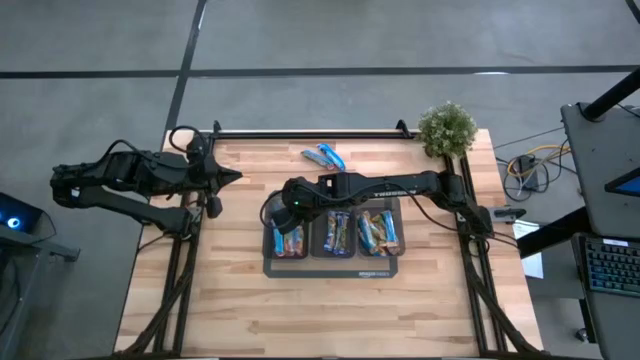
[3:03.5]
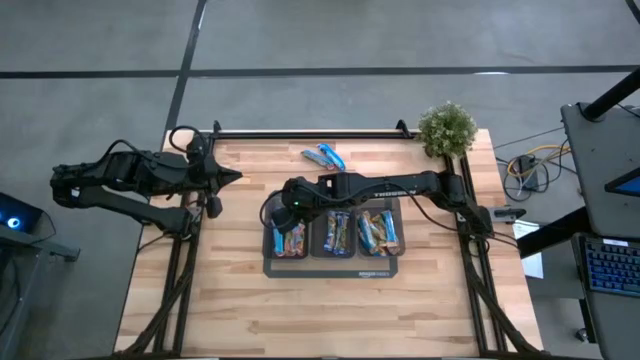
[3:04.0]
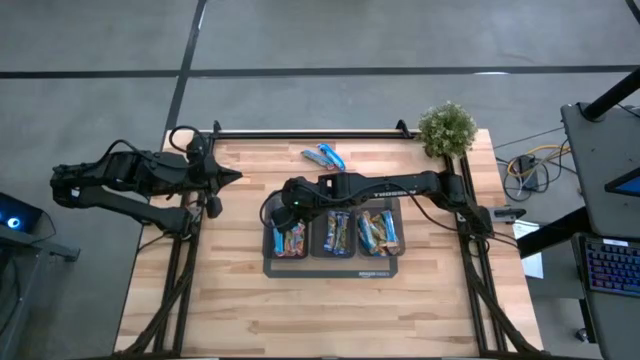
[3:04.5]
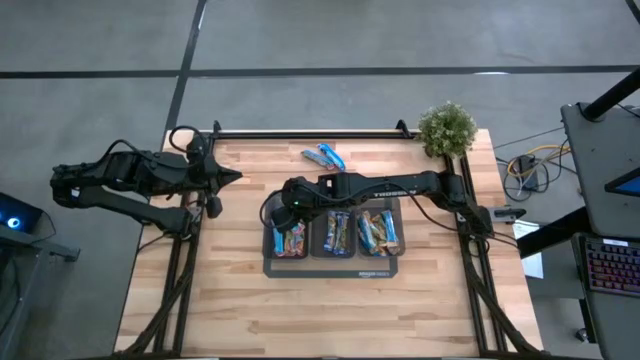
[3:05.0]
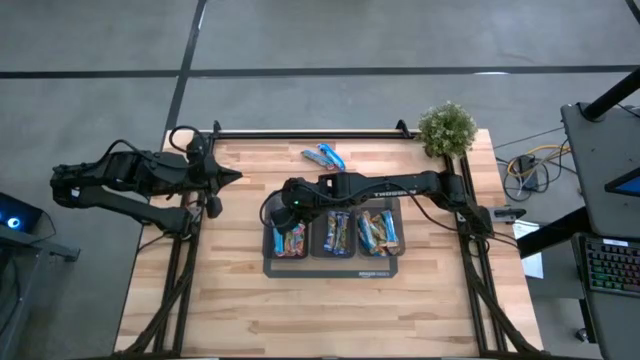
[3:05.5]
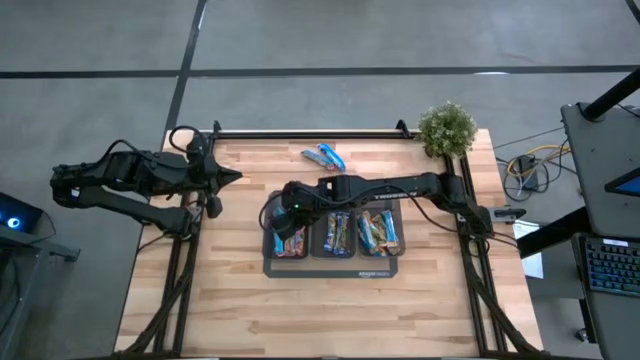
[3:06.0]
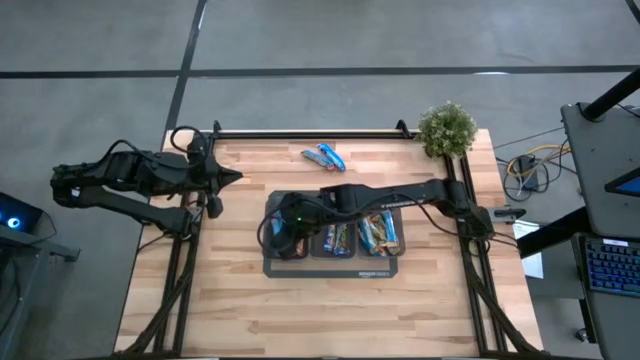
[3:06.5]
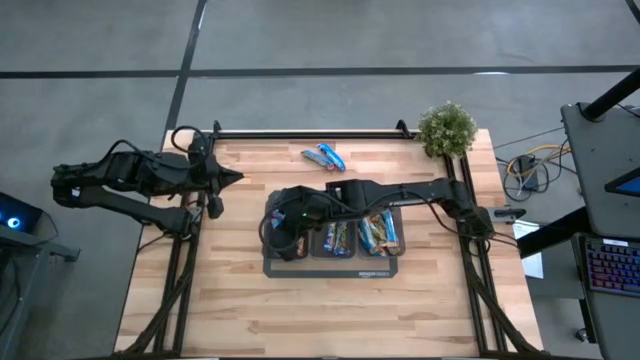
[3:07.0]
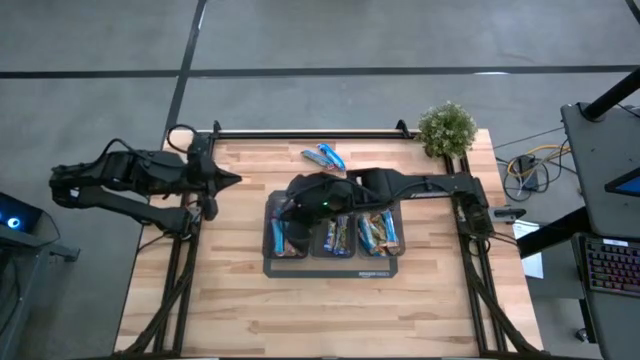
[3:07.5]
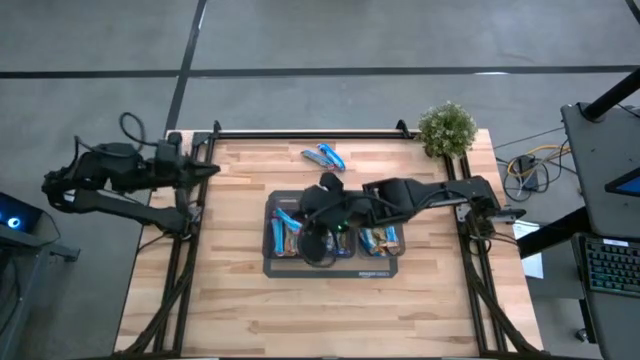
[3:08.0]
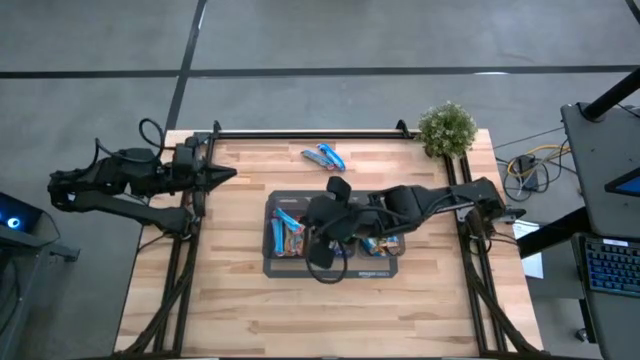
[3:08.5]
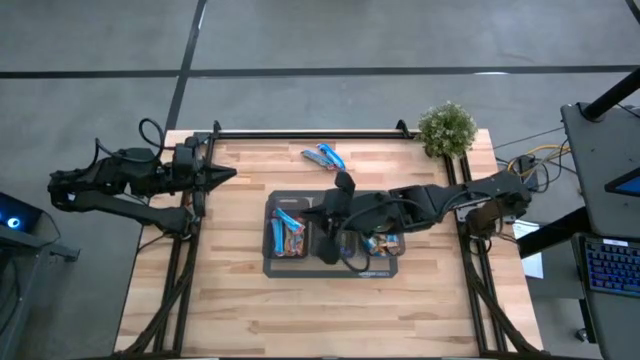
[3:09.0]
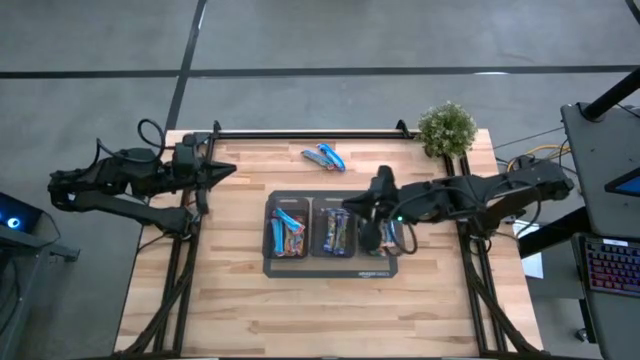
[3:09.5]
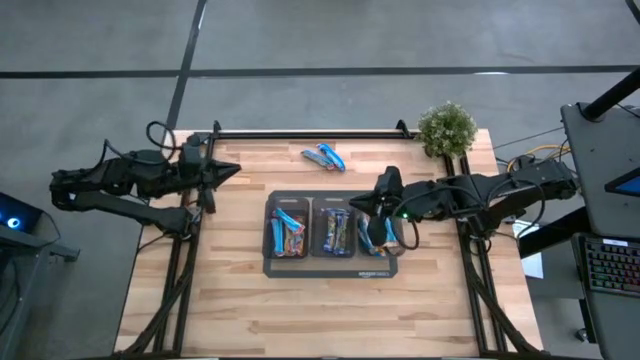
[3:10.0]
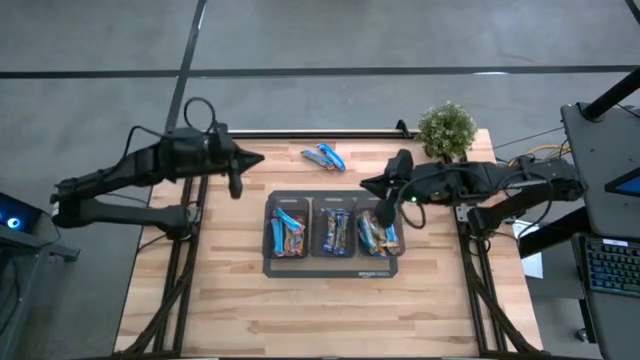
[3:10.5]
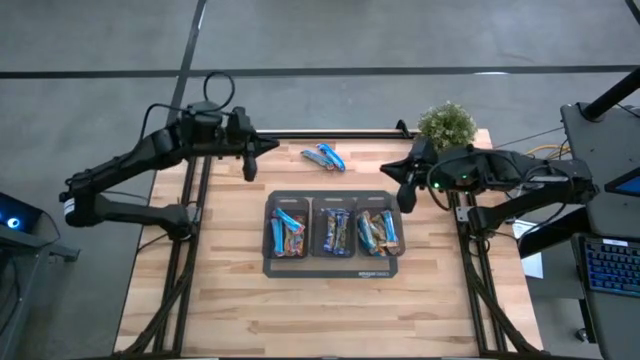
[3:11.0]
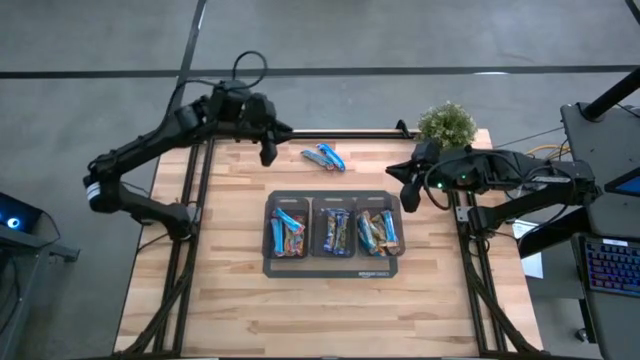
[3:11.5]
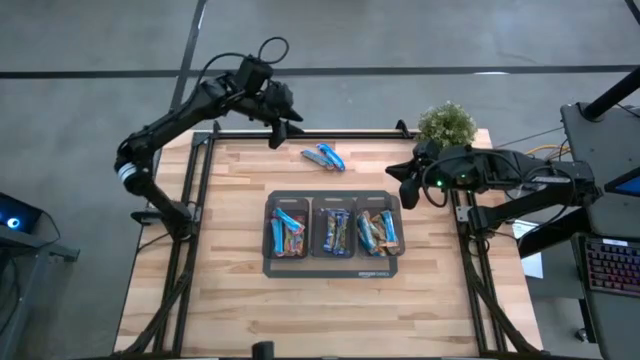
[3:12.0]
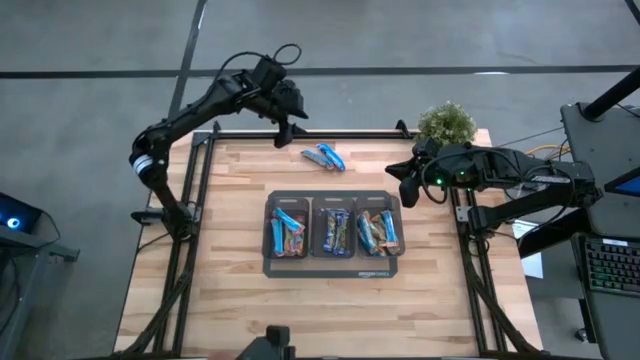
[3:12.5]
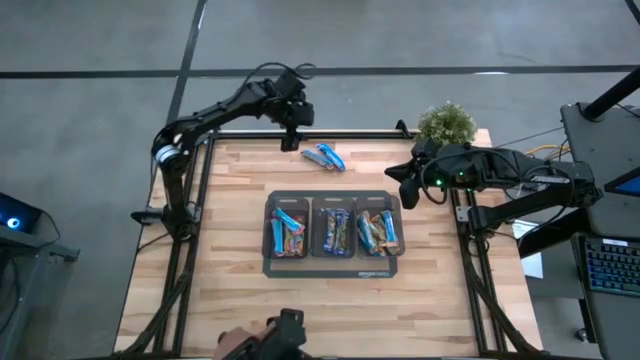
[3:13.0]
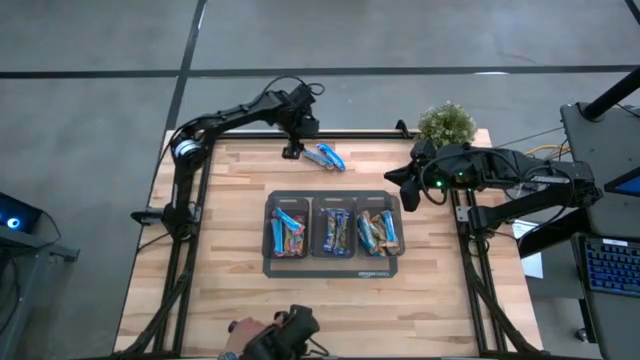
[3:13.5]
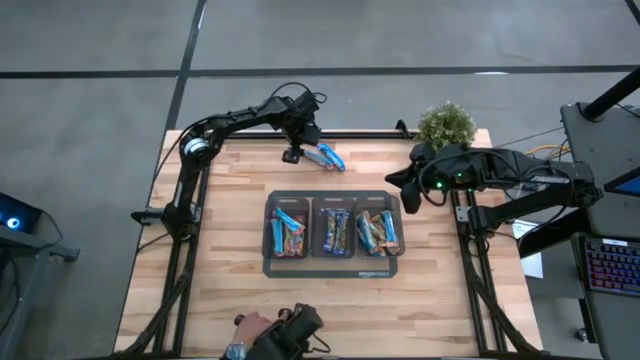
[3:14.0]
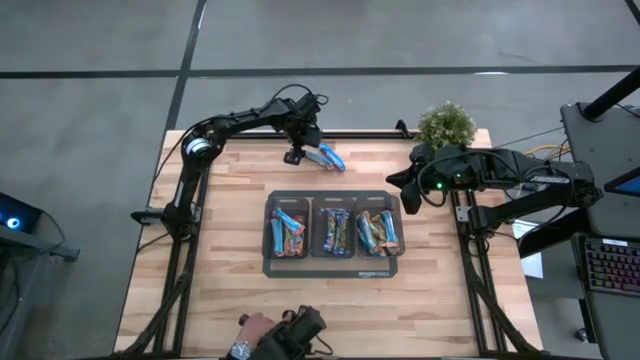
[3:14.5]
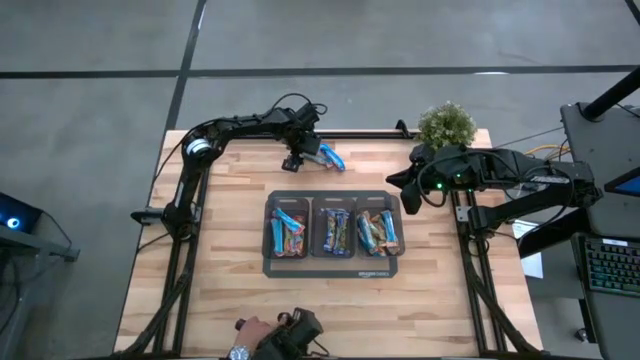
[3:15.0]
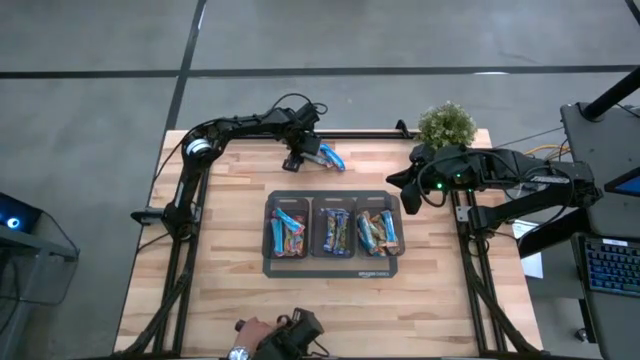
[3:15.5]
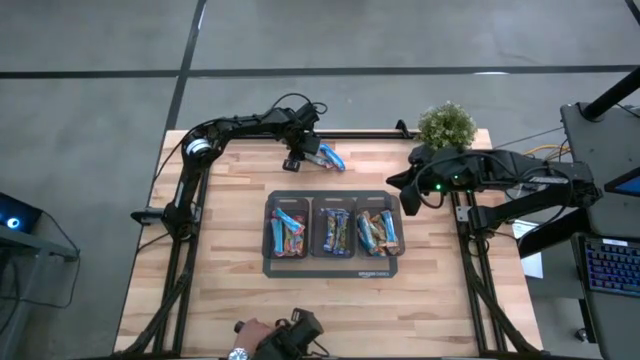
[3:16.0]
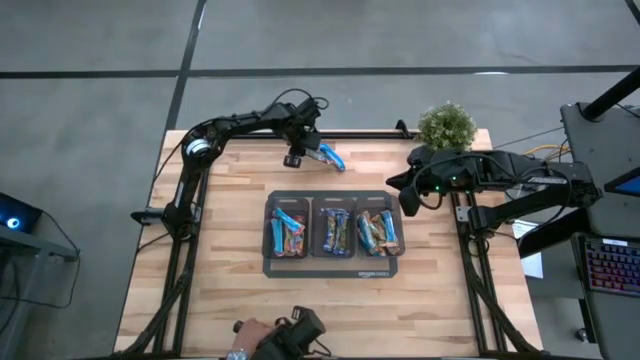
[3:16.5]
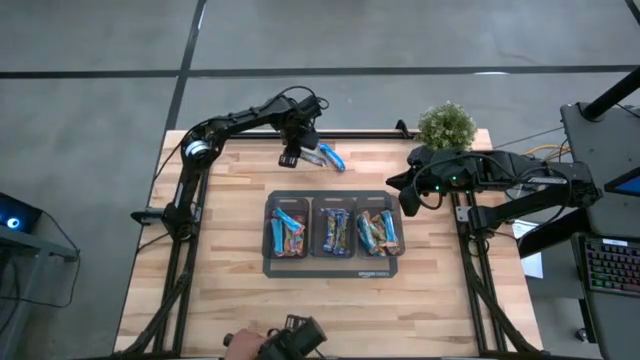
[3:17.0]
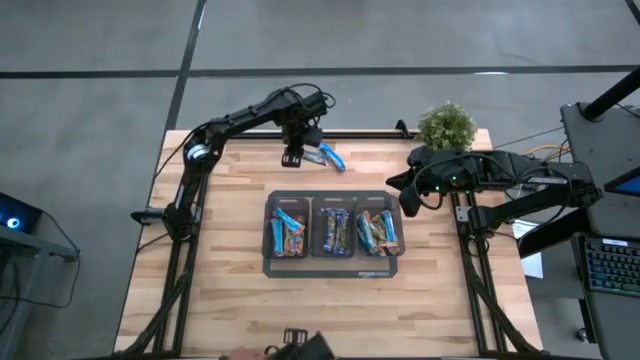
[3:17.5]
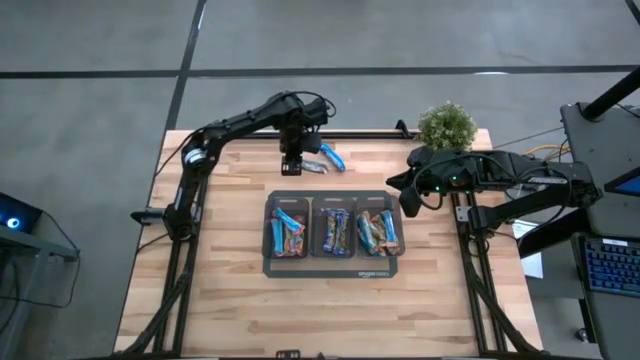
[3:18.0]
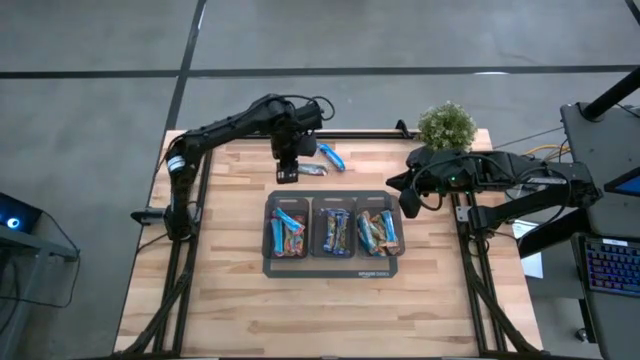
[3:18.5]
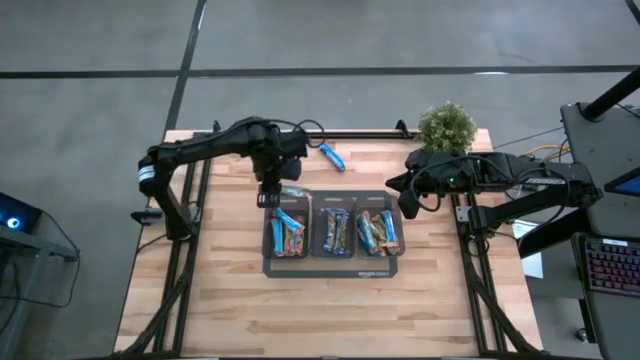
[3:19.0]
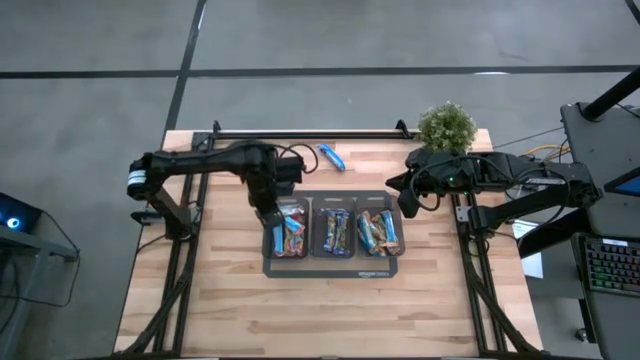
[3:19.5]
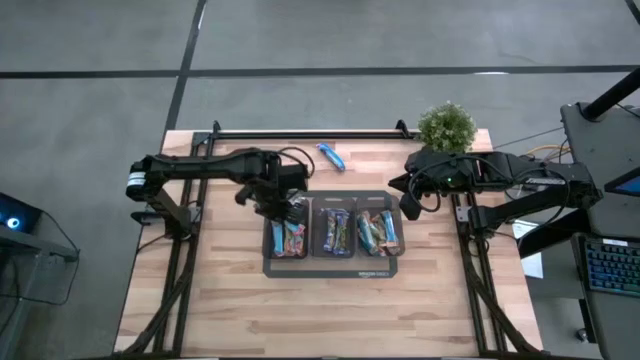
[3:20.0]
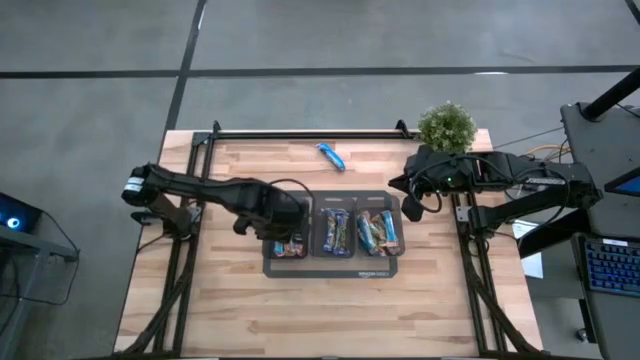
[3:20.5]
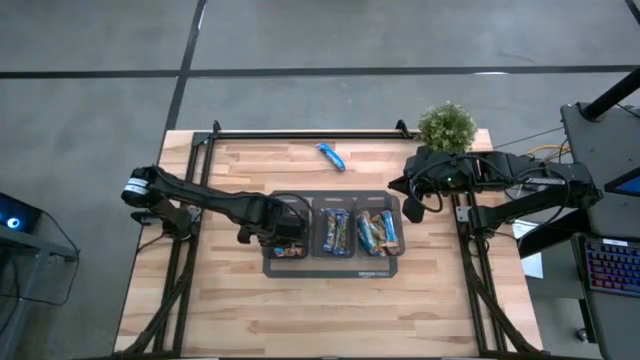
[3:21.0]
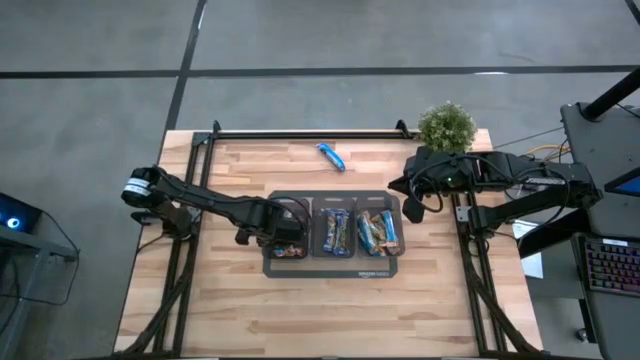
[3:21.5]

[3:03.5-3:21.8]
Task: Pick and place Granola Bars by type
Put the red granola bar into the left black bin

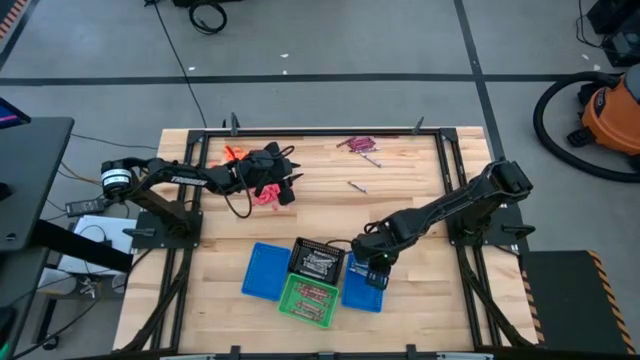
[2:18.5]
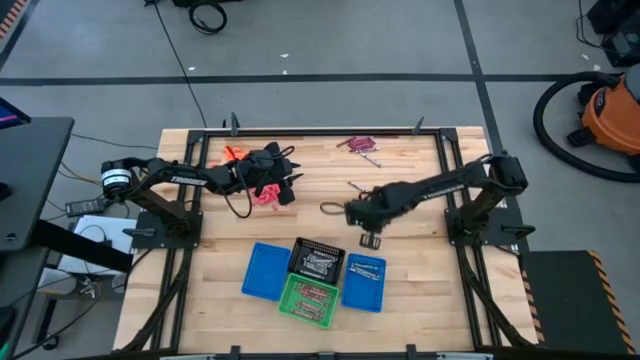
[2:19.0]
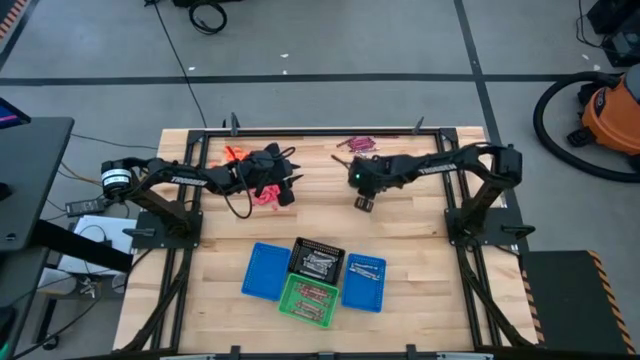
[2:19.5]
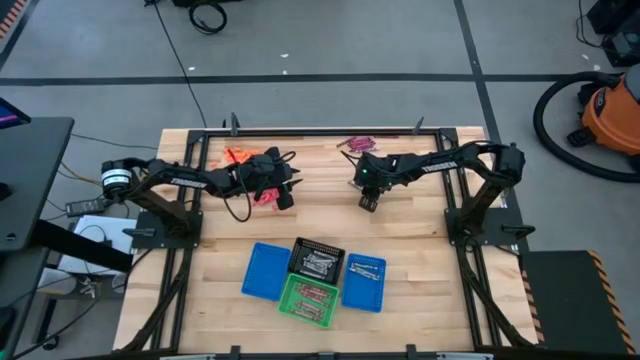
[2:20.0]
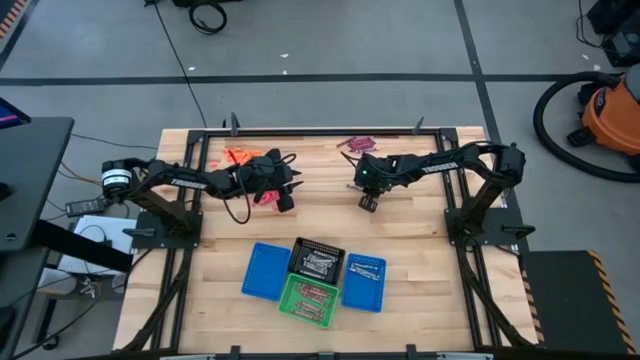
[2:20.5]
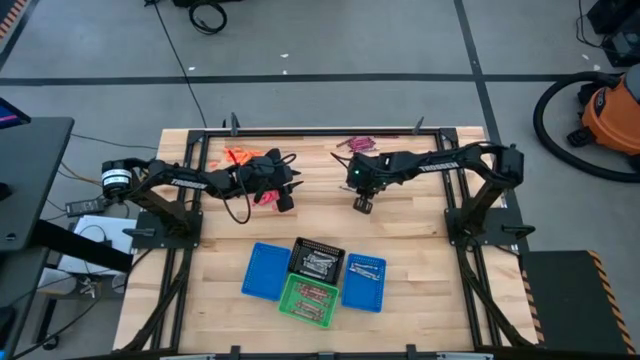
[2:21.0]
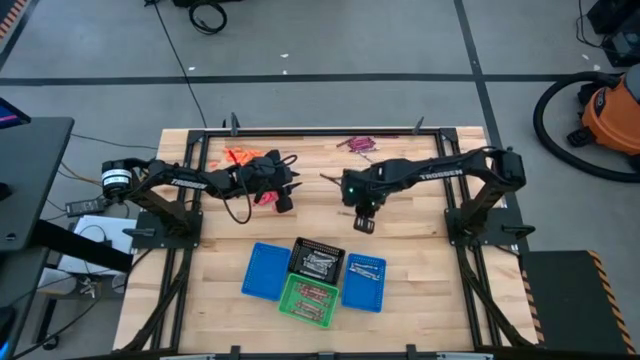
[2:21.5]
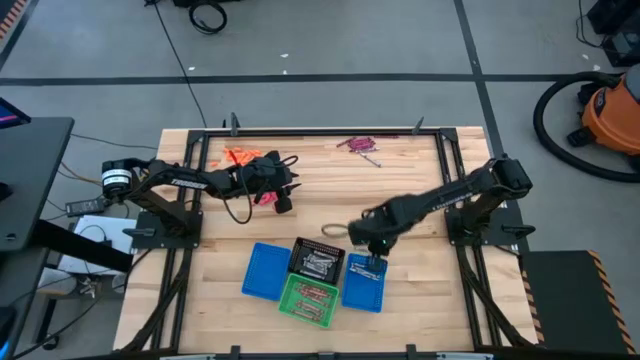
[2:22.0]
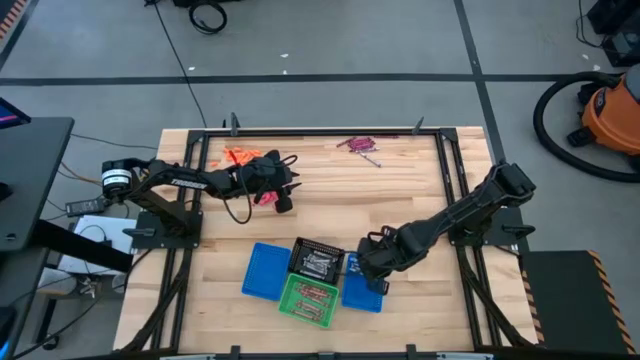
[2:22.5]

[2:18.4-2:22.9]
Task: Sort crayons
Put the white crayon into the right blue bin
